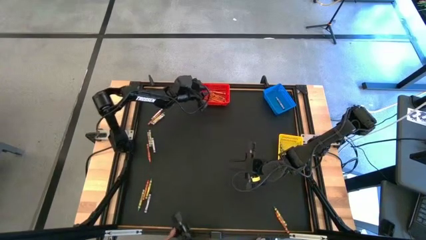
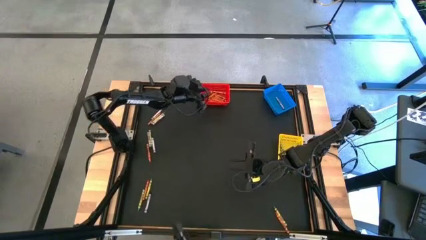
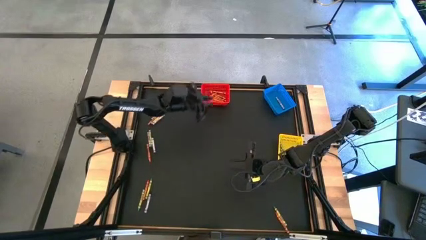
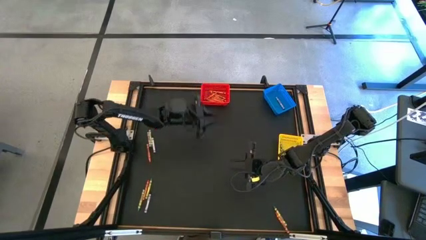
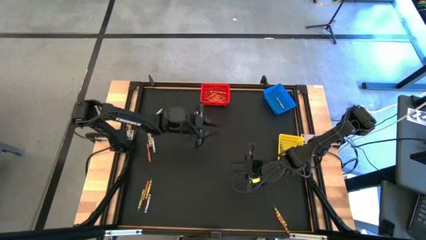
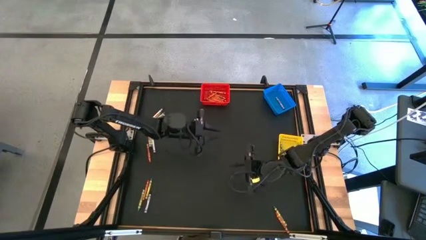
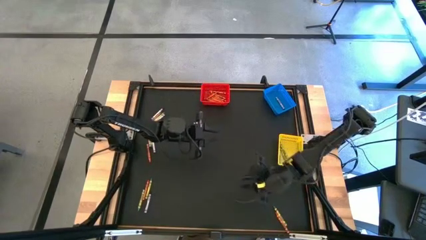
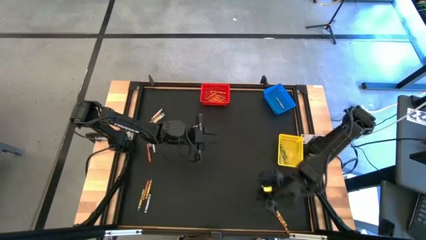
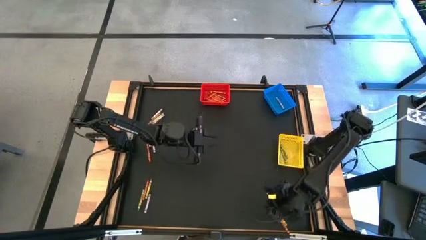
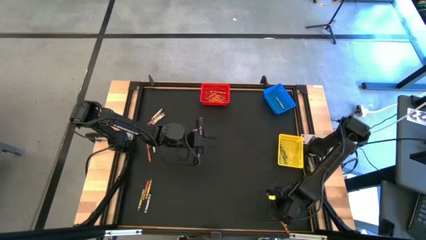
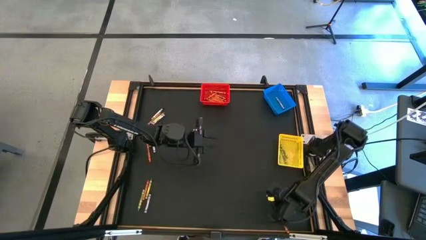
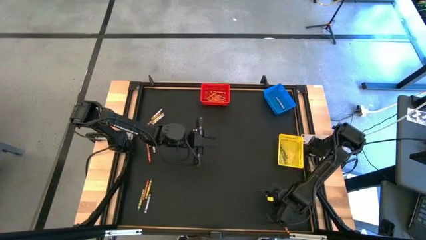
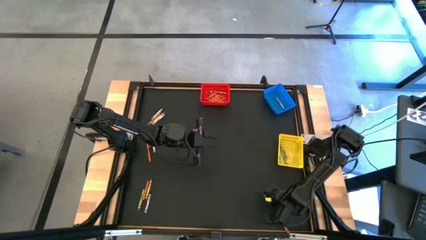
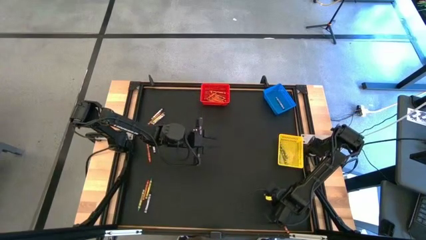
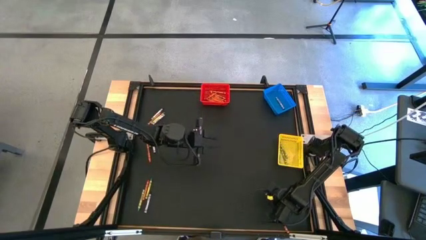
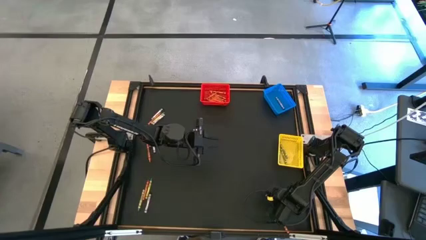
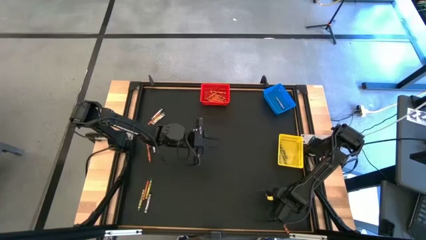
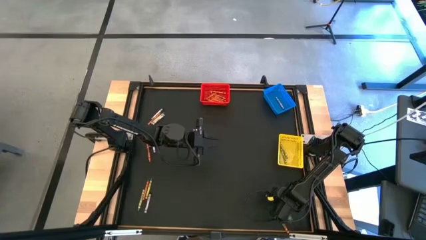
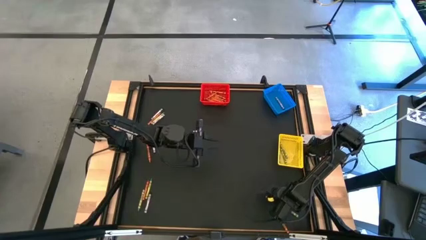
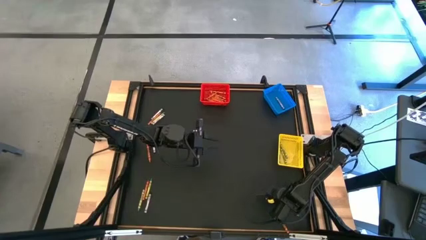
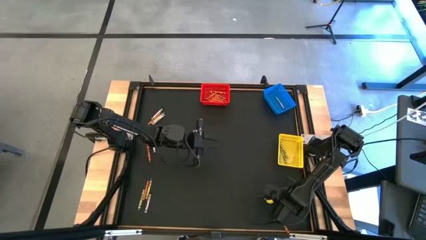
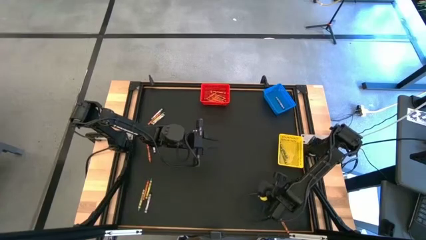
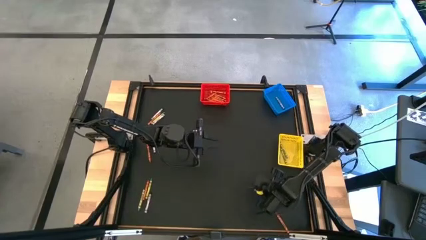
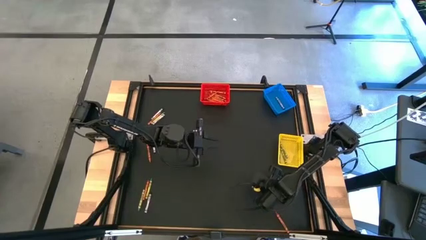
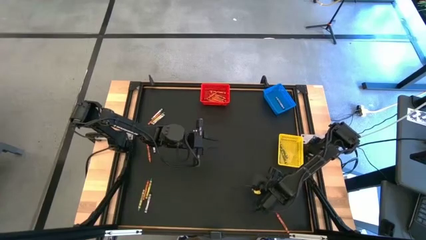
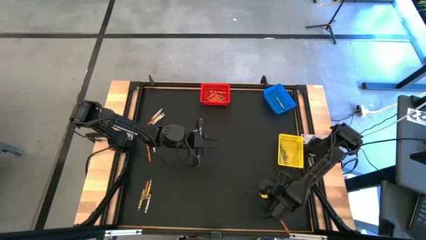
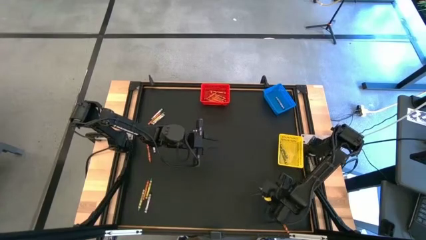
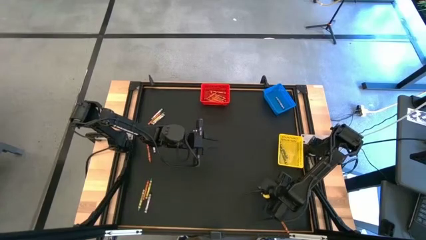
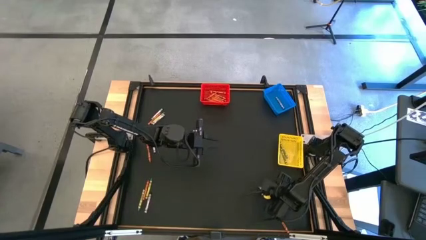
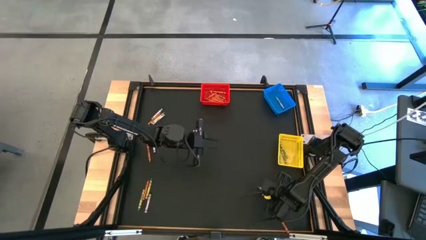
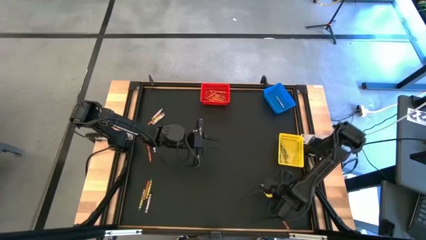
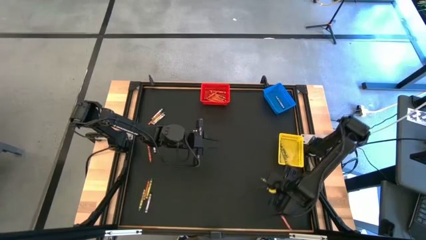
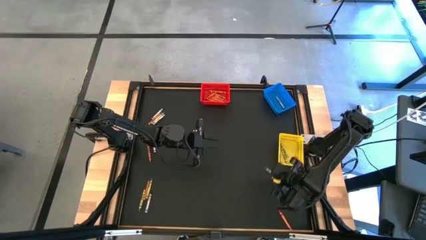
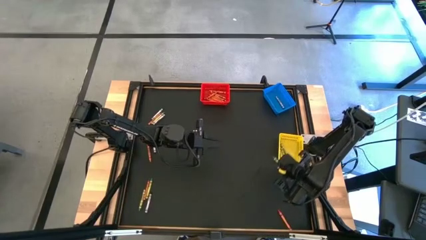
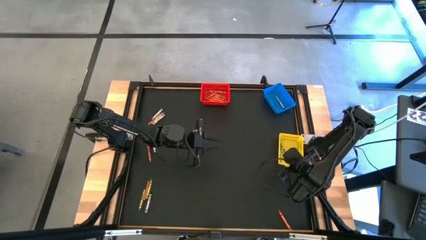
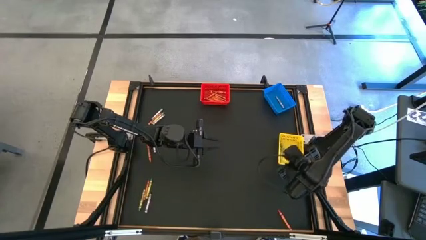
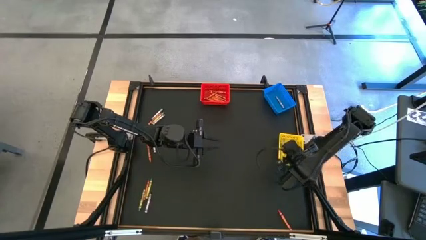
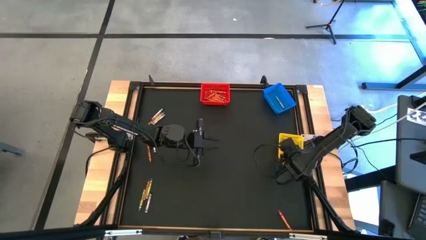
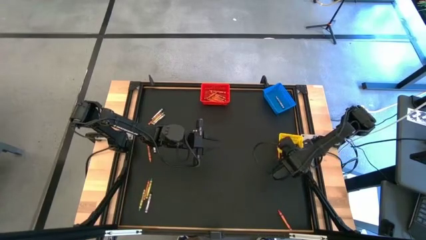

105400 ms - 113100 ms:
Task: Sort crayons
Put the green crayon into the yellow bin

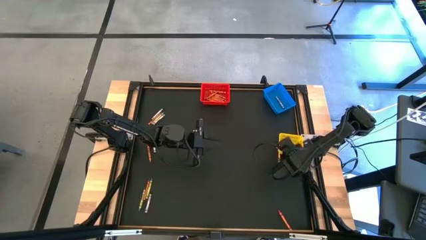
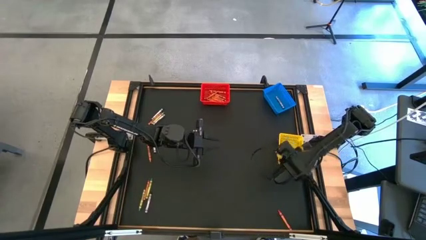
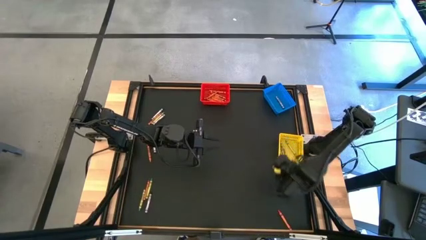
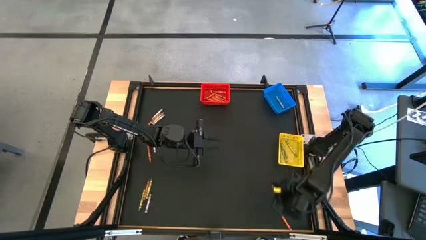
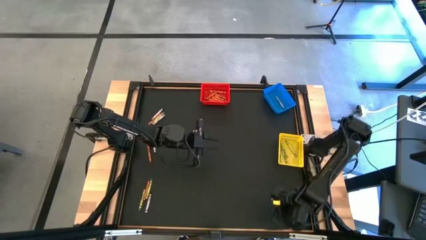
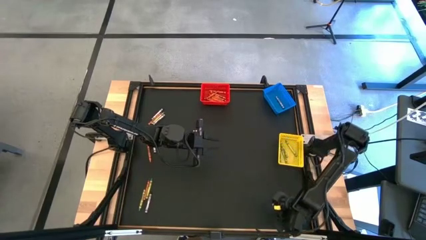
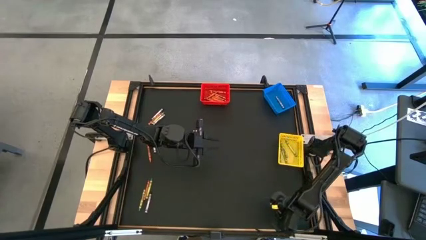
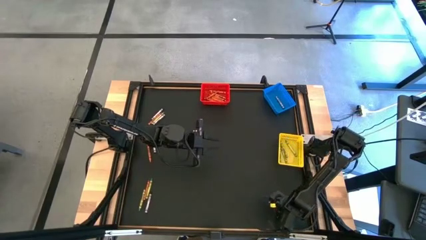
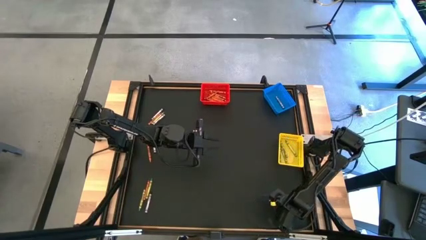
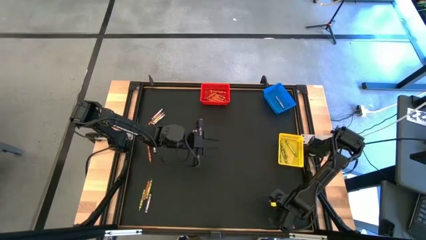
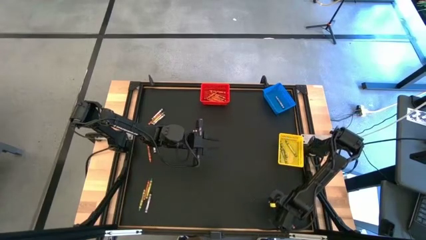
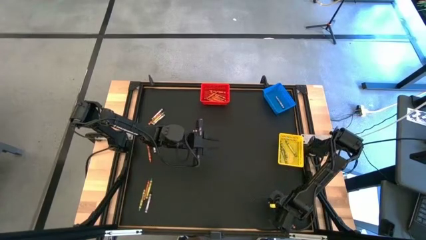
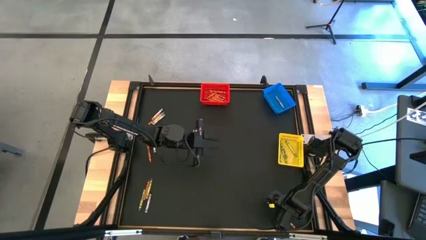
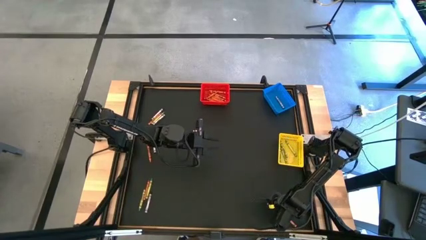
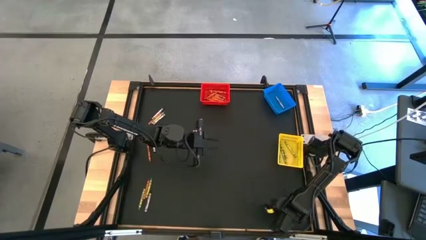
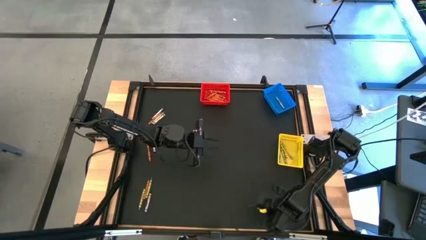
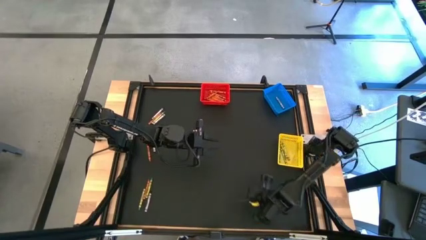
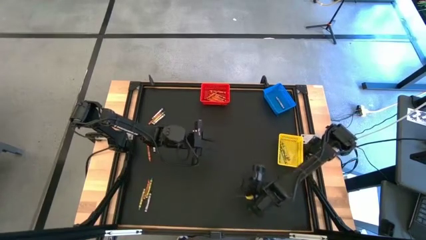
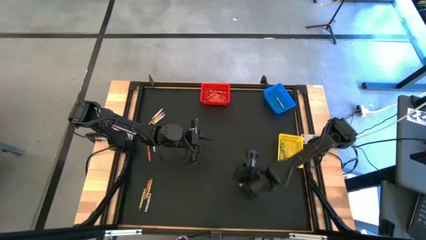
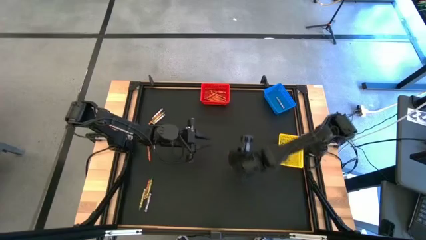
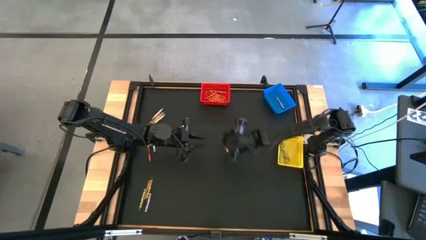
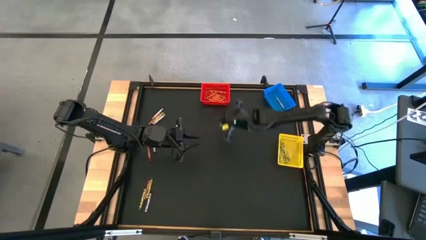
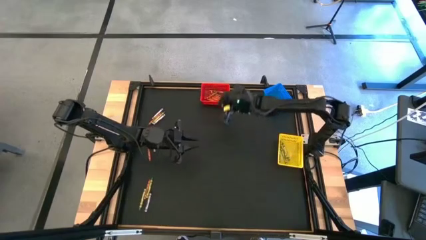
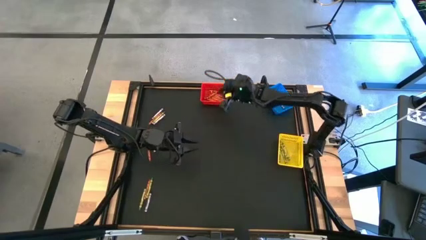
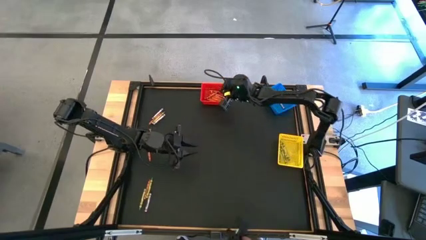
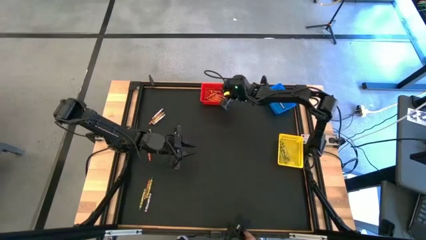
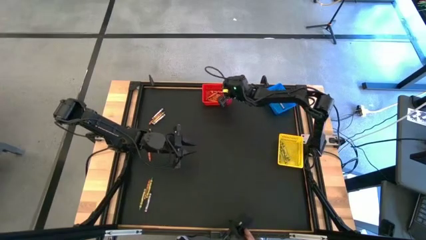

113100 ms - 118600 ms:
Put the orange crayon into the red bin

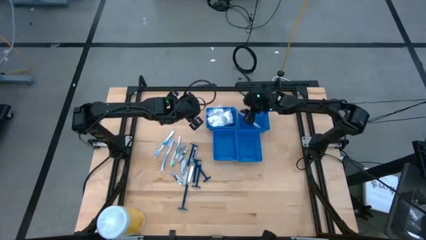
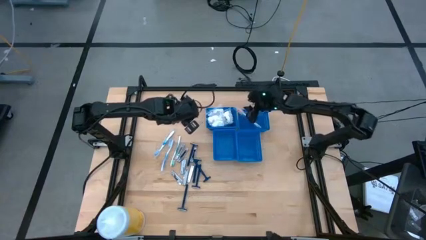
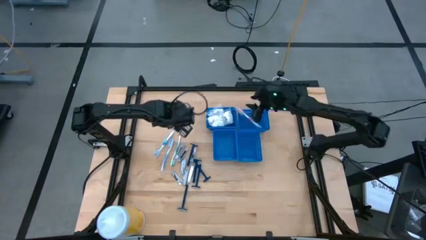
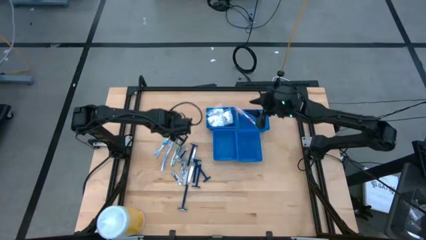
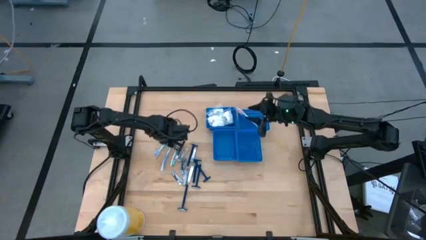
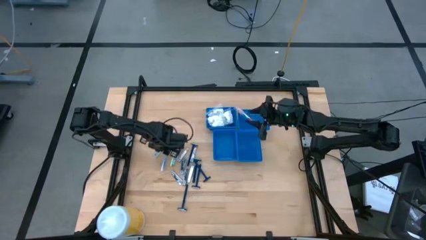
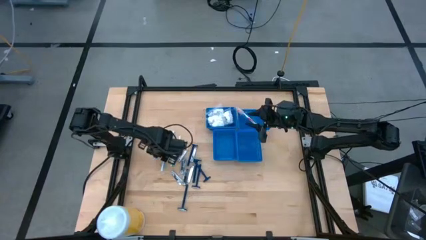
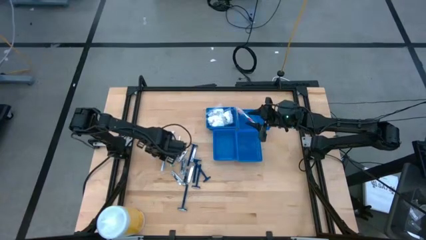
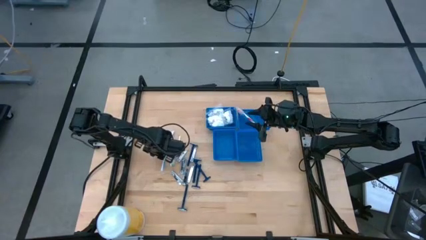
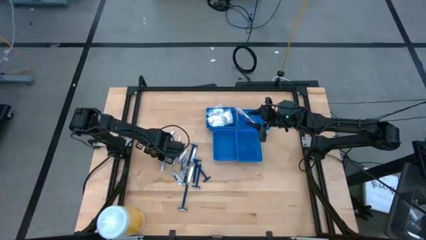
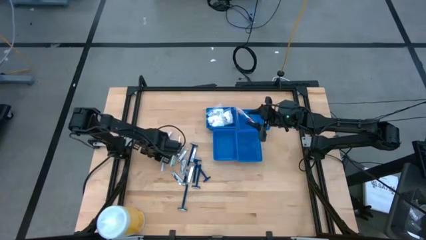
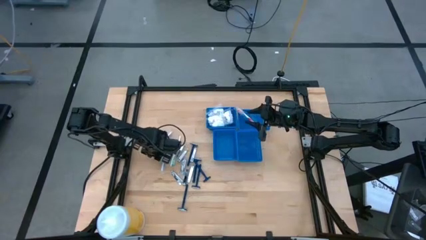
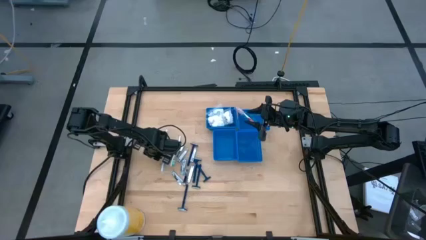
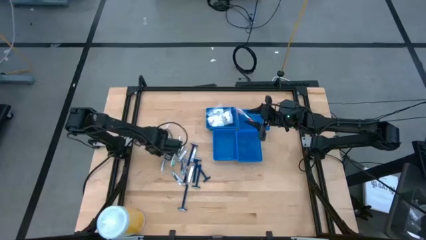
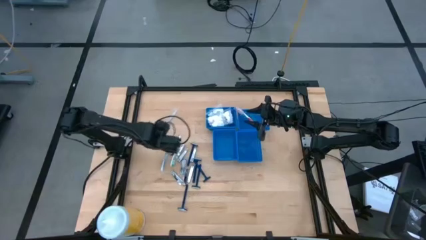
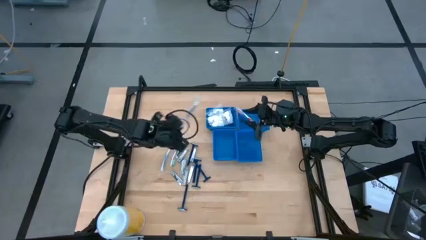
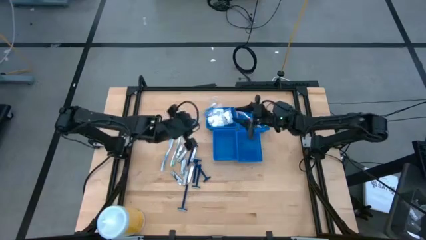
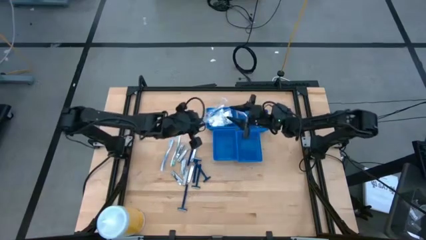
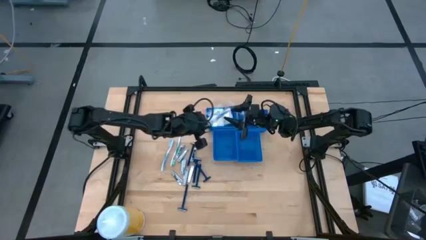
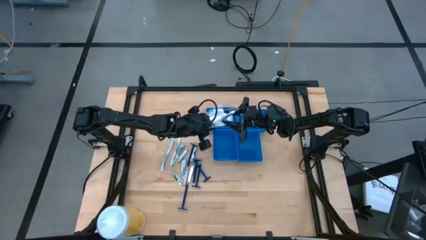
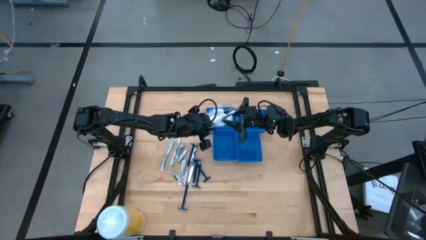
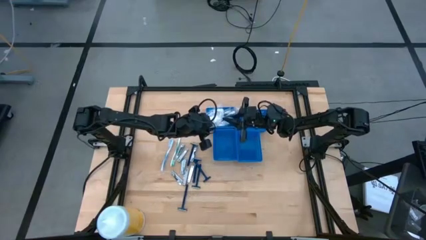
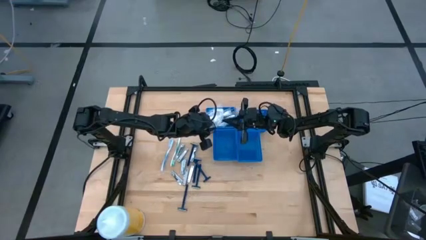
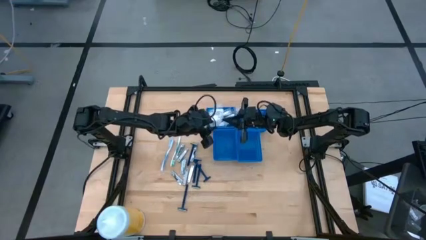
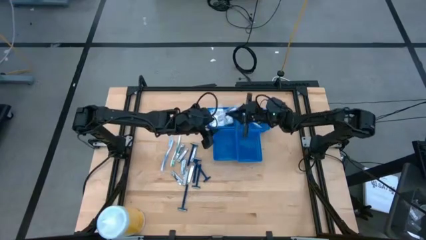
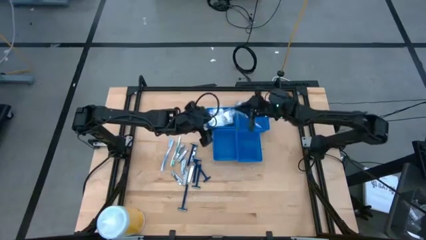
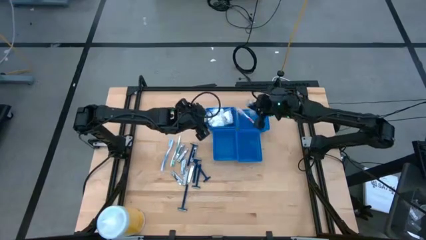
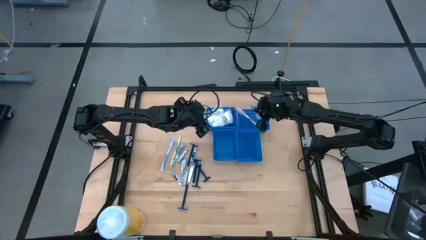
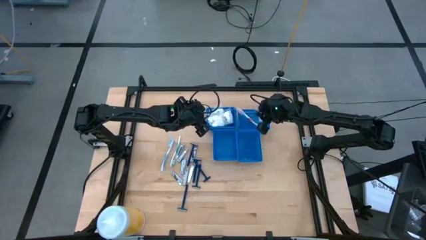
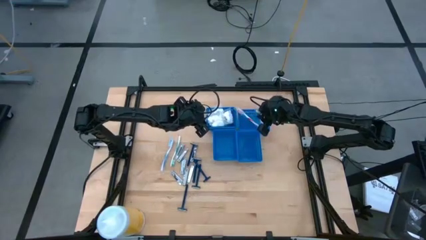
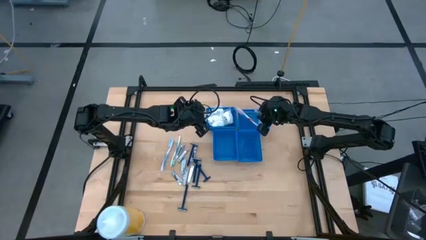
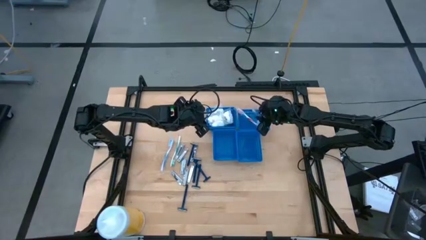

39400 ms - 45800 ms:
Task: Pick & Place Travel size toiletries
Put the blue toothbrush into the top right blue basket
